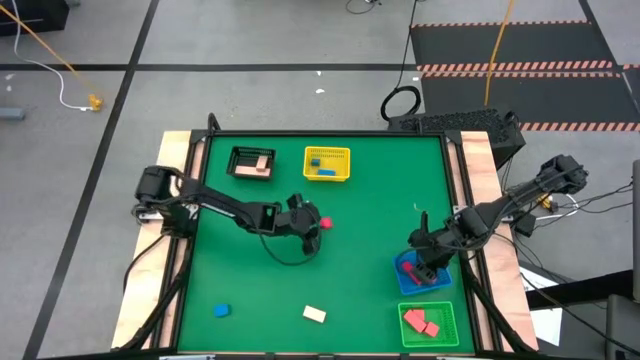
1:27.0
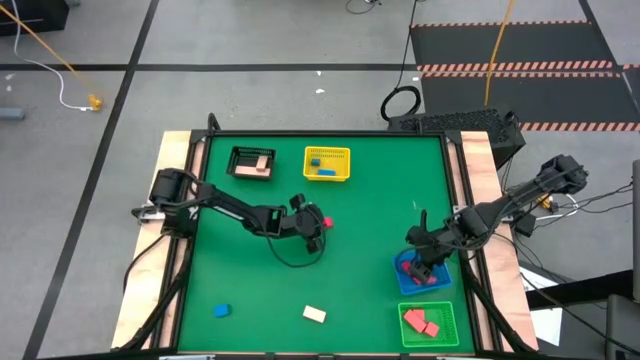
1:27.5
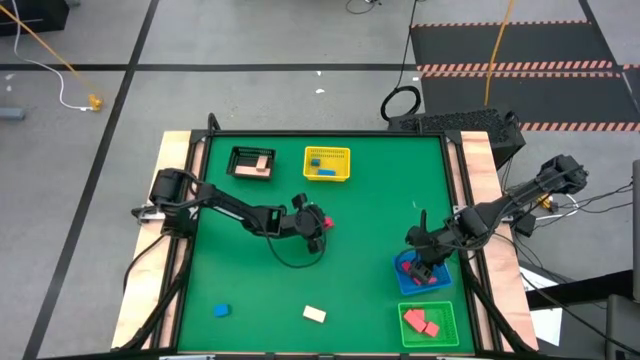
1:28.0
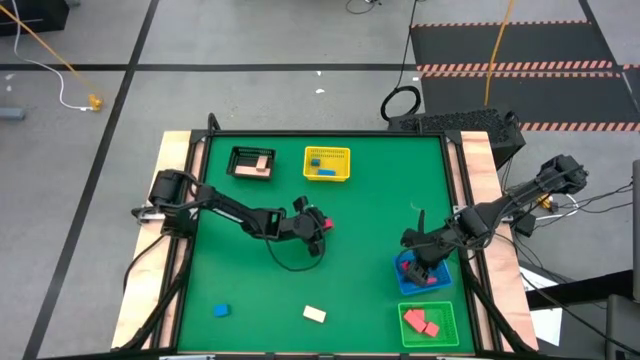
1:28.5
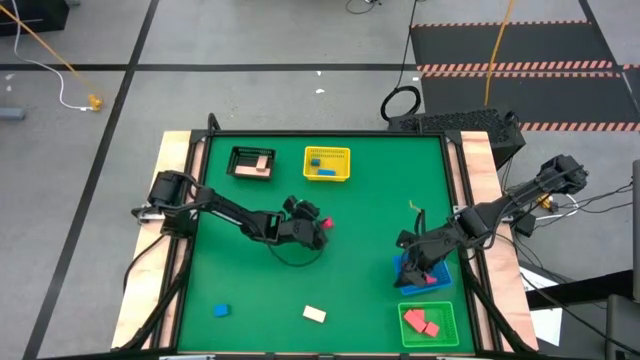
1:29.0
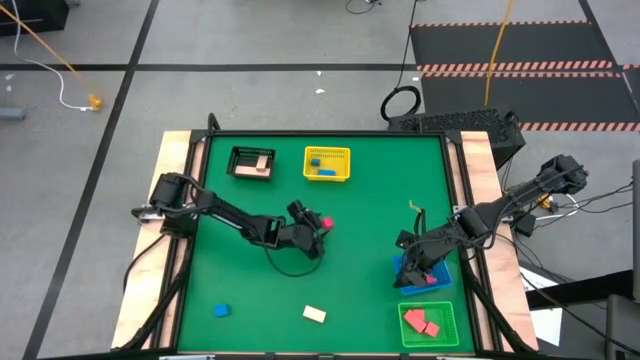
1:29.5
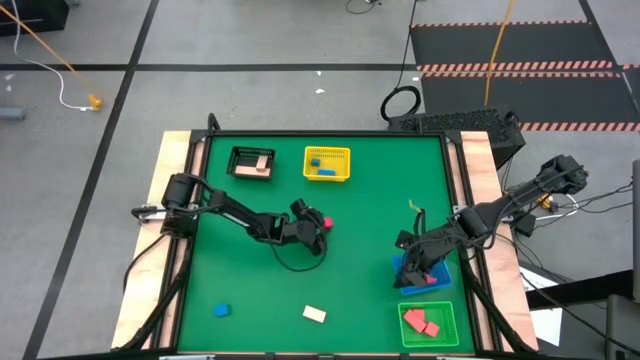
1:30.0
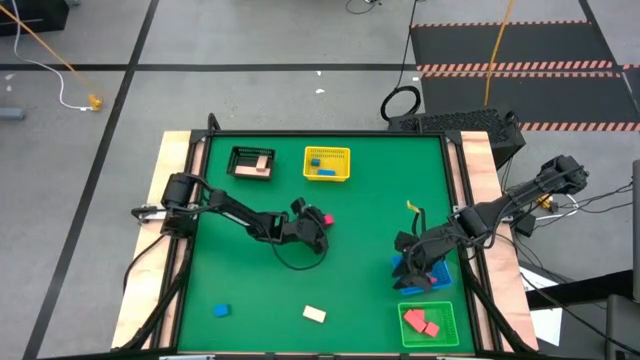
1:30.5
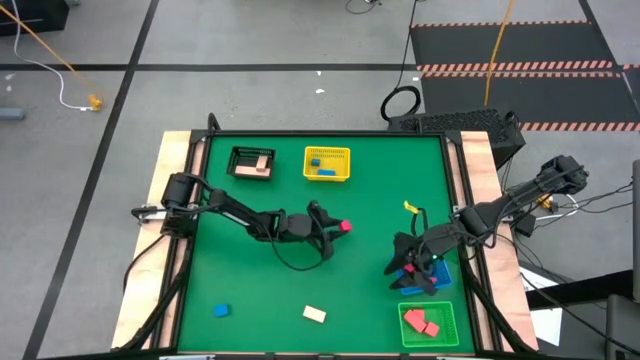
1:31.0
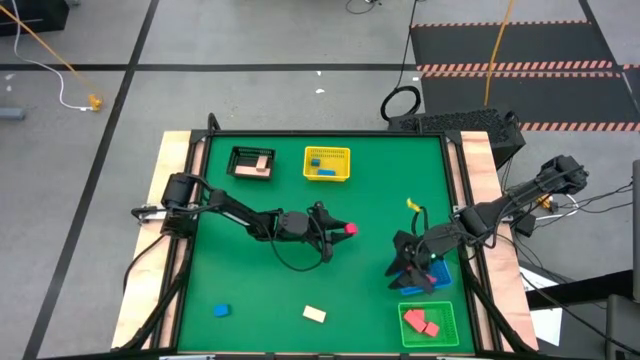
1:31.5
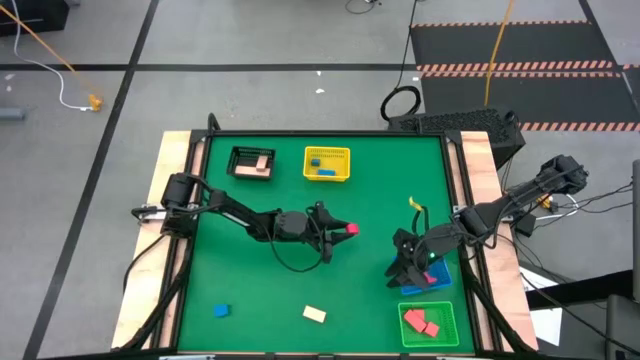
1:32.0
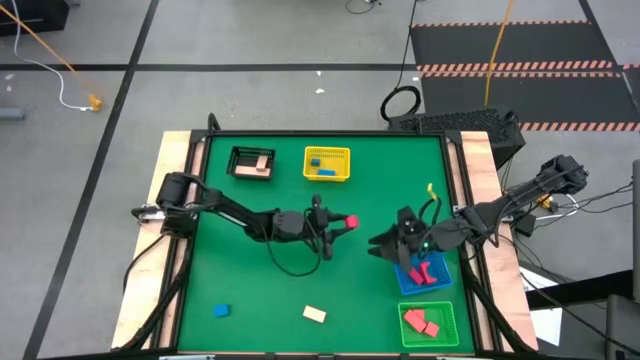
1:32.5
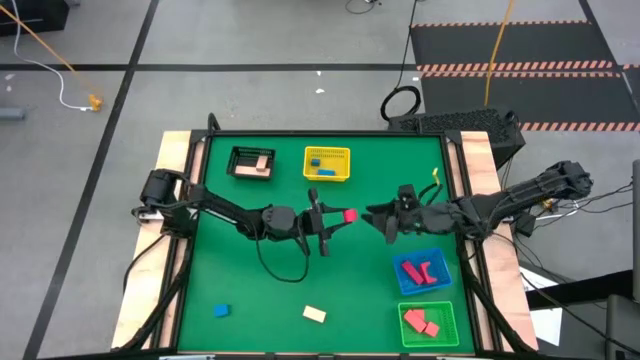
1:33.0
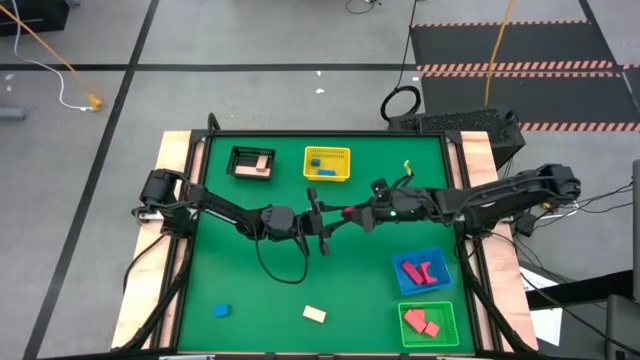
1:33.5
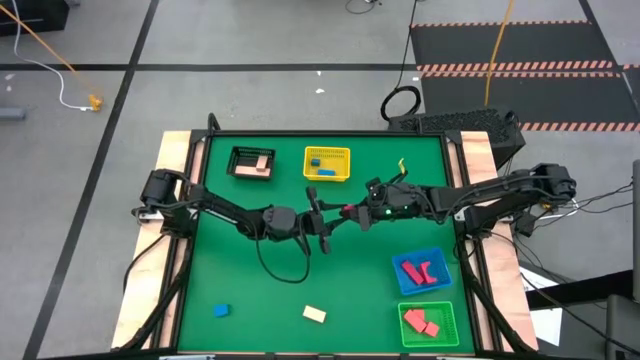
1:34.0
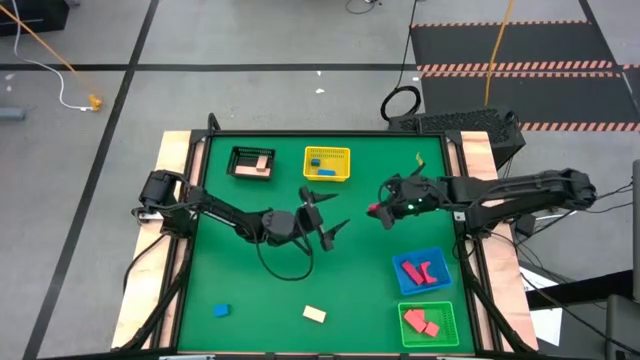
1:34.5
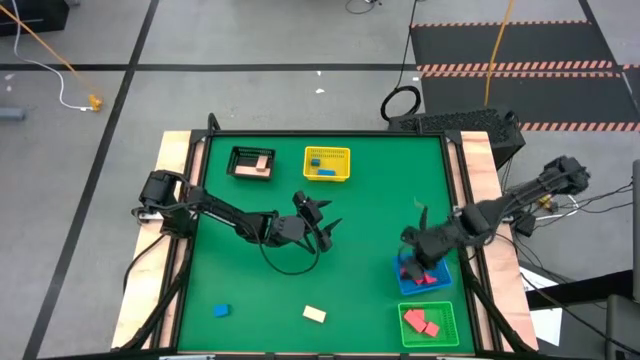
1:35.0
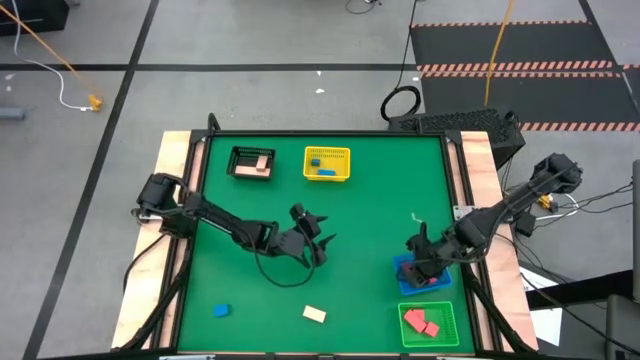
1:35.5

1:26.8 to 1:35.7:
Task: Sort & place blocks by color
Put the red block into the blue bin

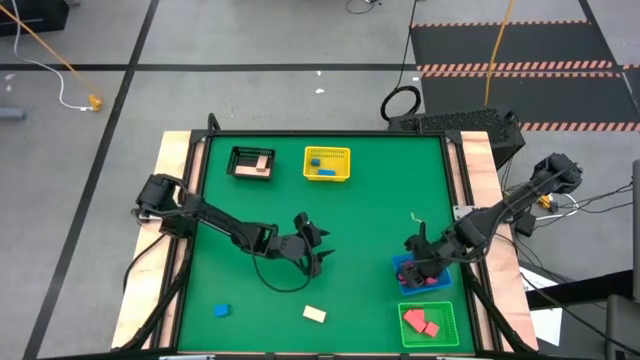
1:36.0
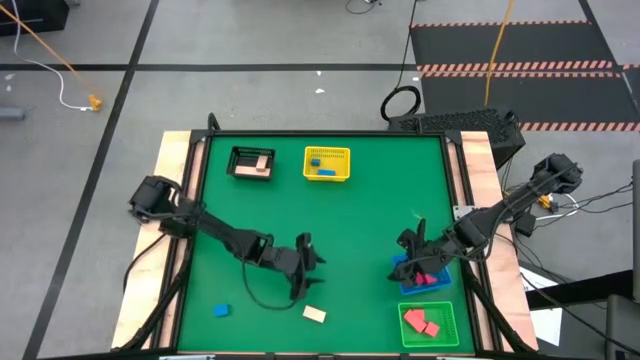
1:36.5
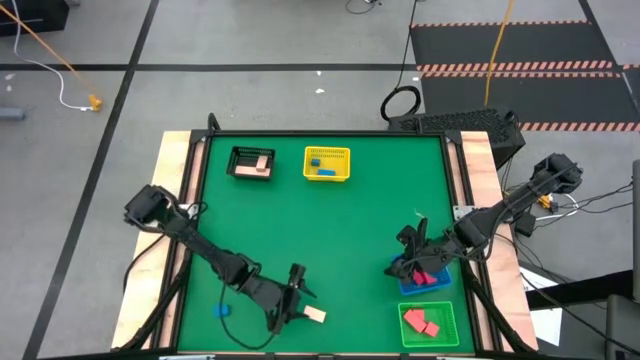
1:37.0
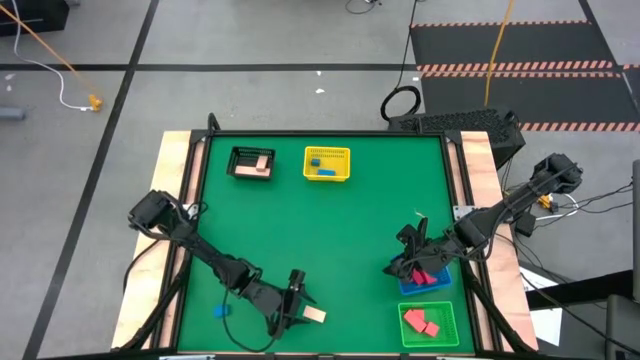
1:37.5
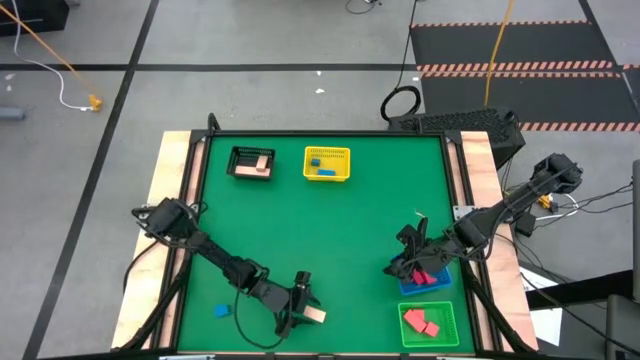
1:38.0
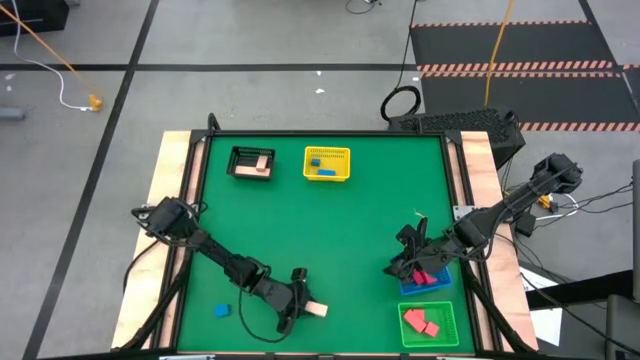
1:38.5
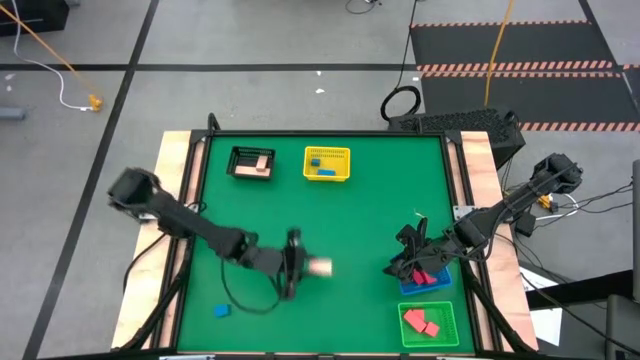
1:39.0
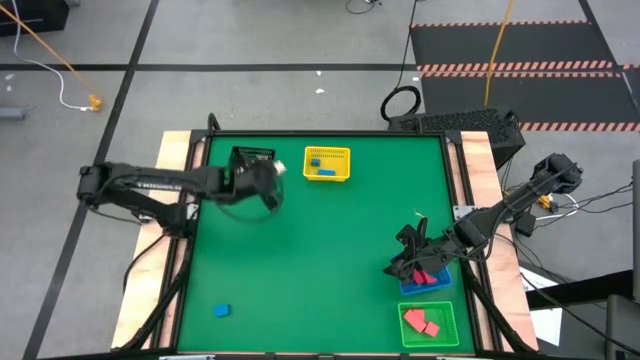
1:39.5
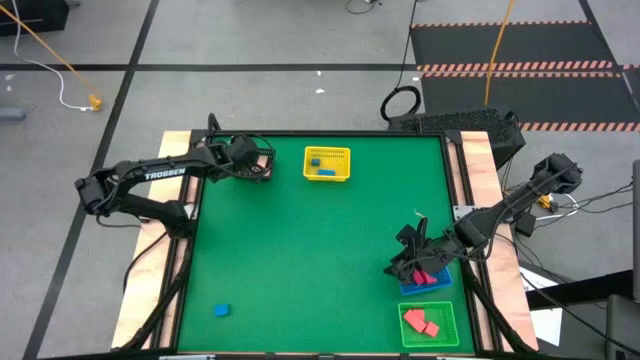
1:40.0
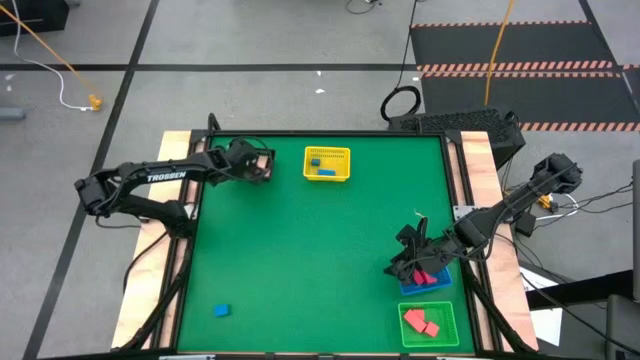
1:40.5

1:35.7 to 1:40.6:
Put the brown block into the black bin

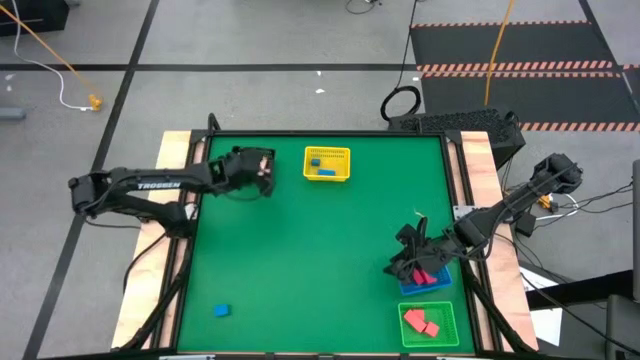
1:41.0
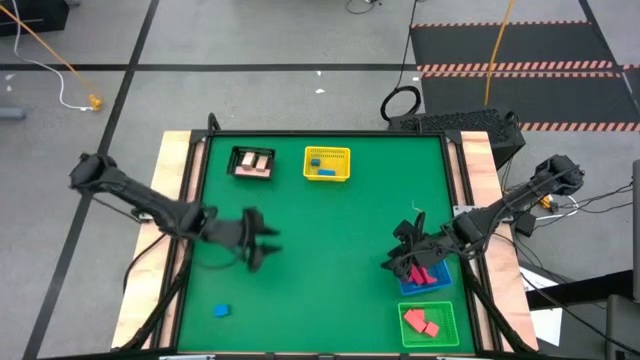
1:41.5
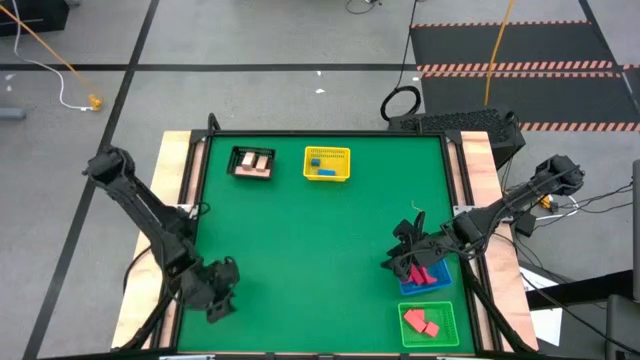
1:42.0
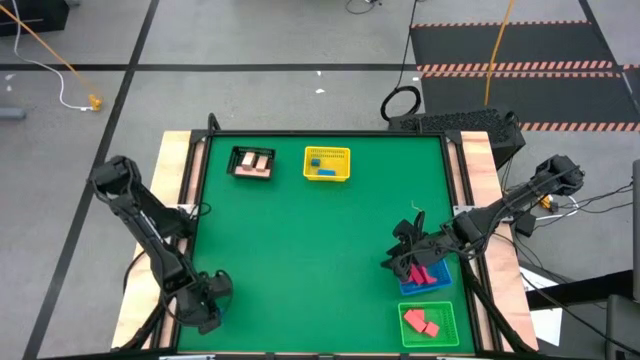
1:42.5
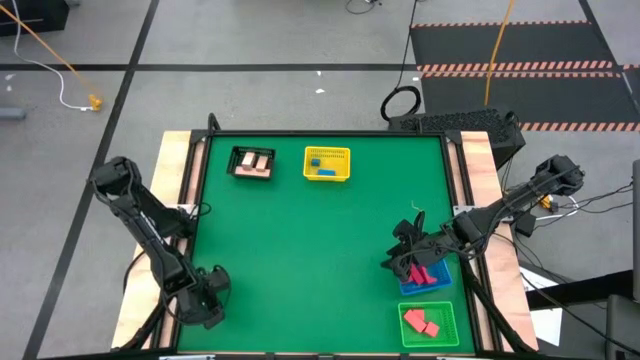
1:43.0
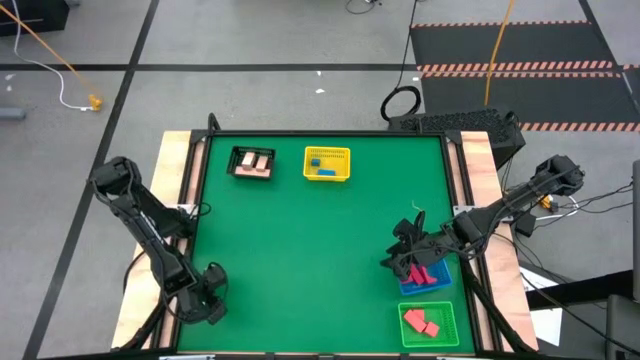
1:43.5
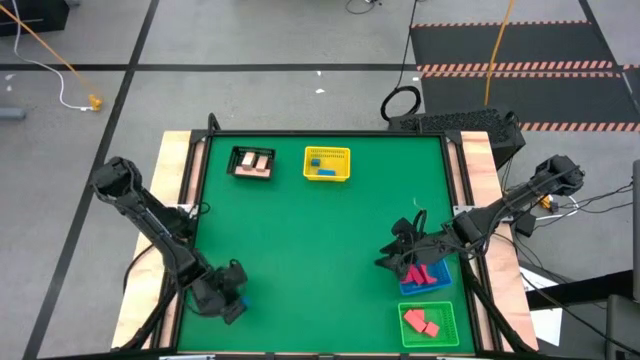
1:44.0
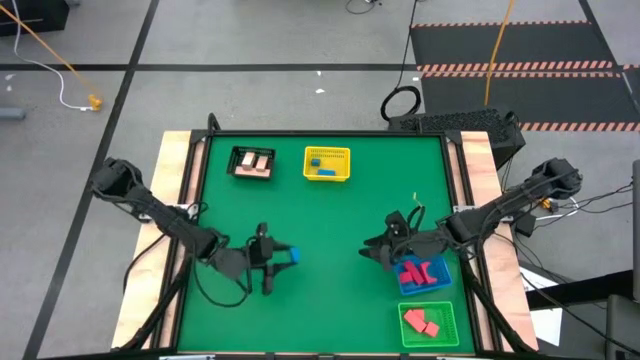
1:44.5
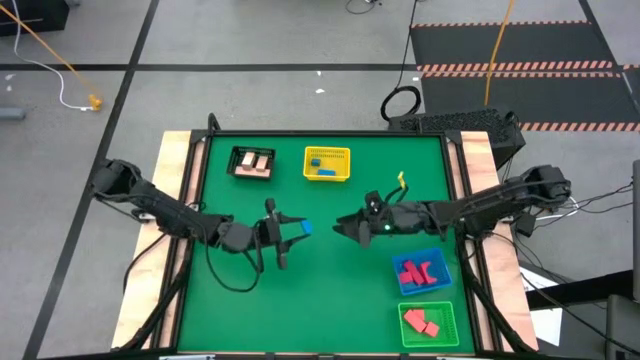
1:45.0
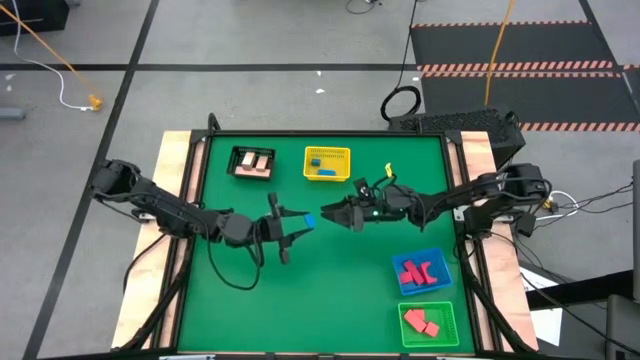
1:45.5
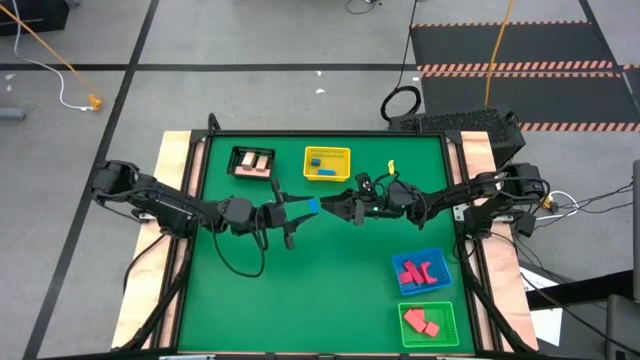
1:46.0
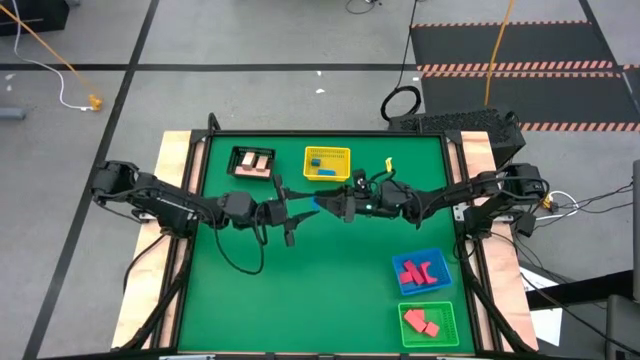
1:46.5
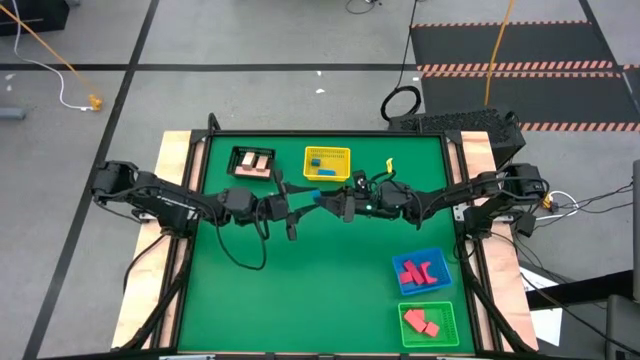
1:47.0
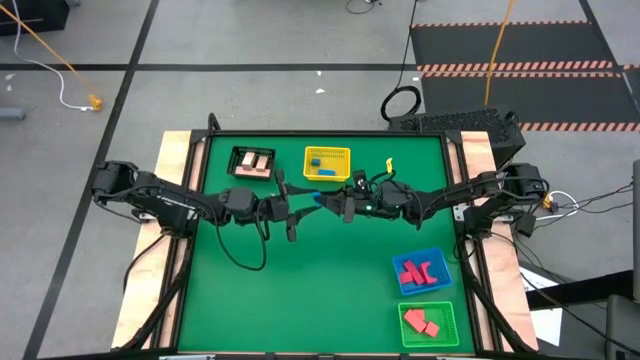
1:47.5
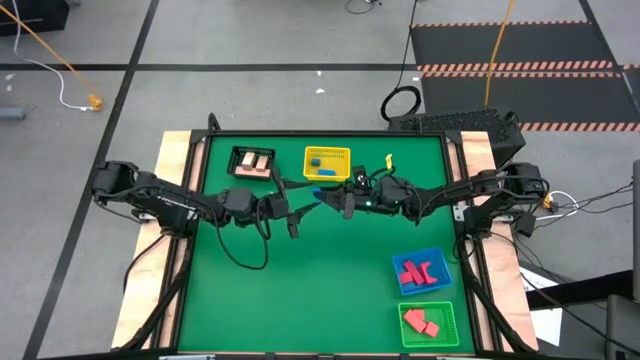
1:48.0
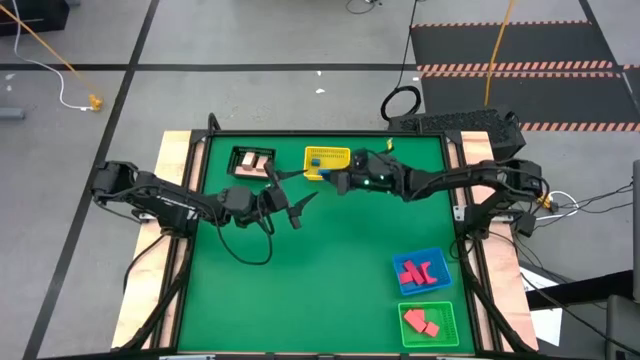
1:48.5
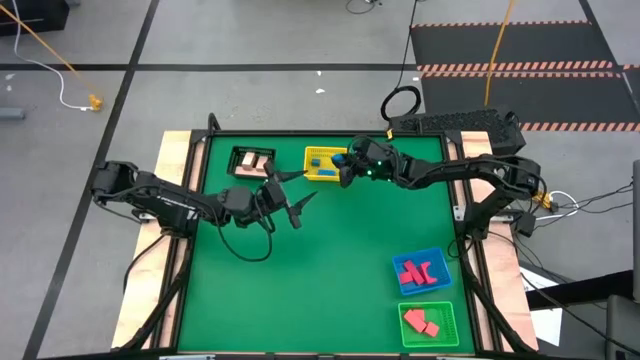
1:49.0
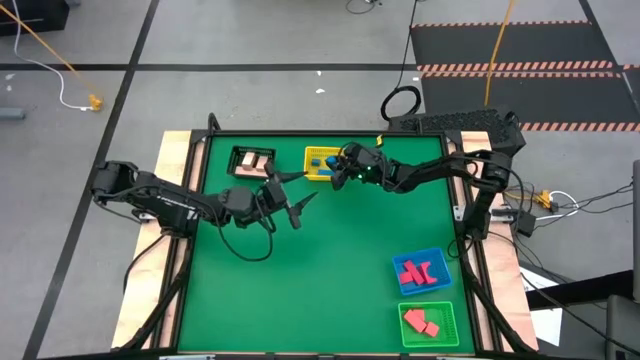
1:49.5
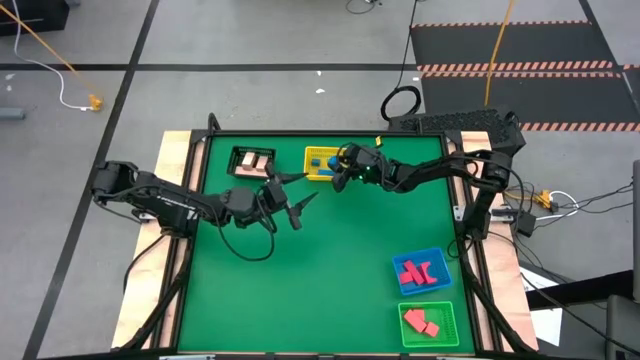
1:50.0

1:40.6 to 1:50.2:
Put the blue block into the yellow bin
